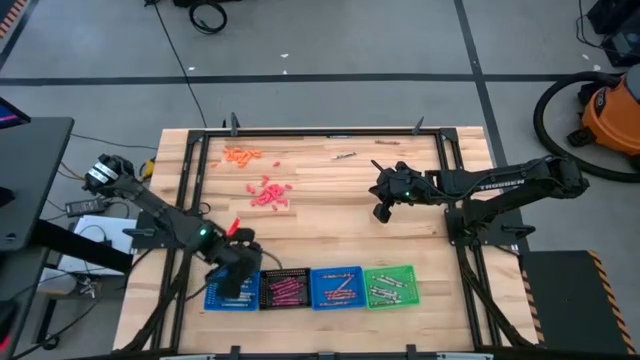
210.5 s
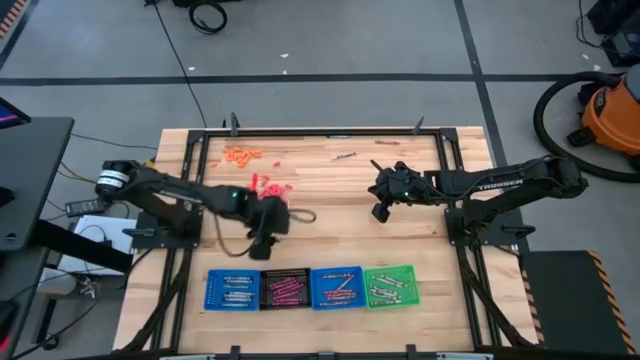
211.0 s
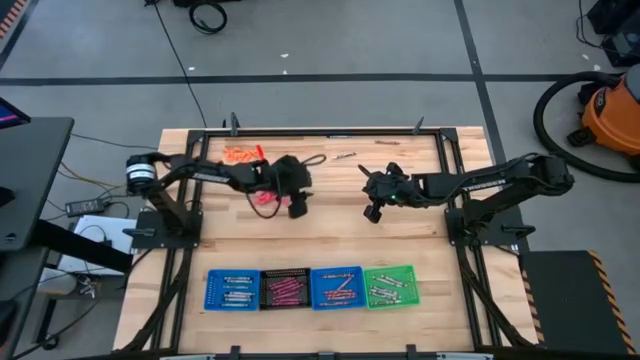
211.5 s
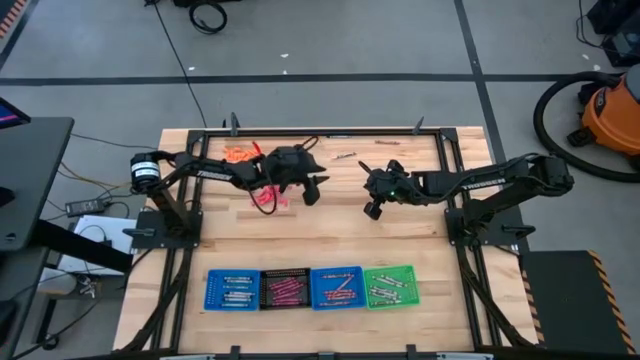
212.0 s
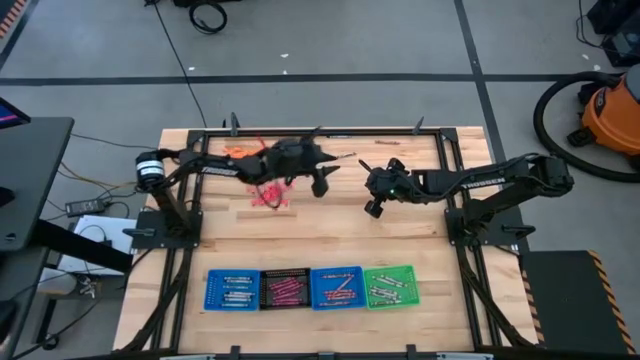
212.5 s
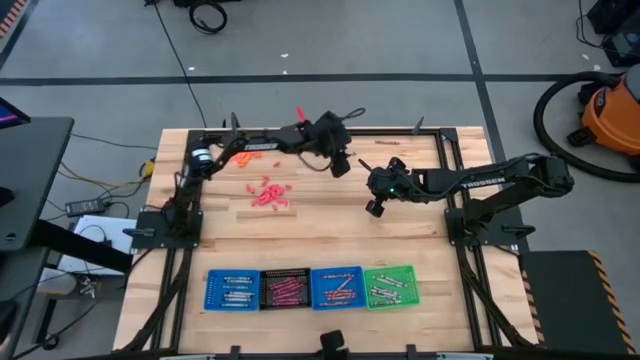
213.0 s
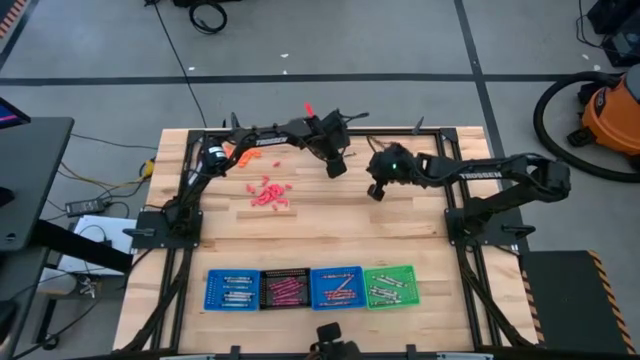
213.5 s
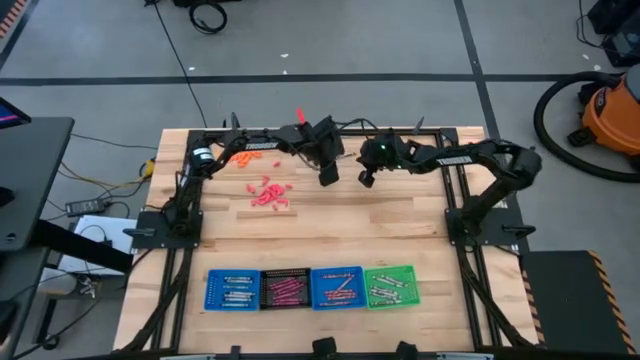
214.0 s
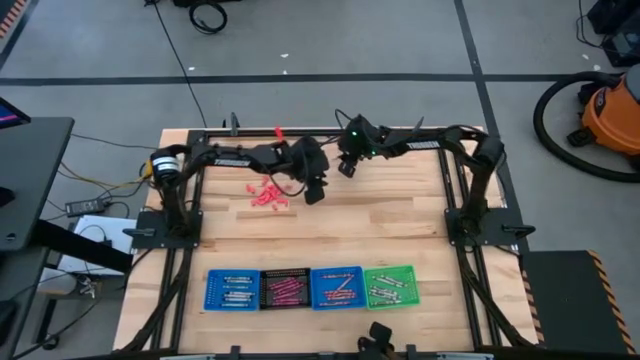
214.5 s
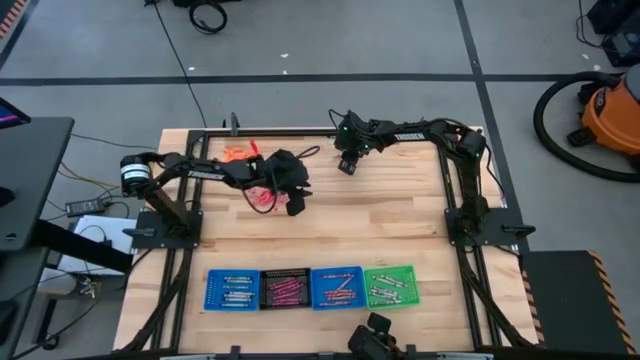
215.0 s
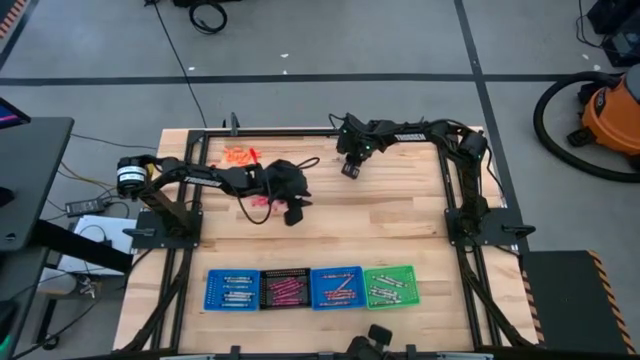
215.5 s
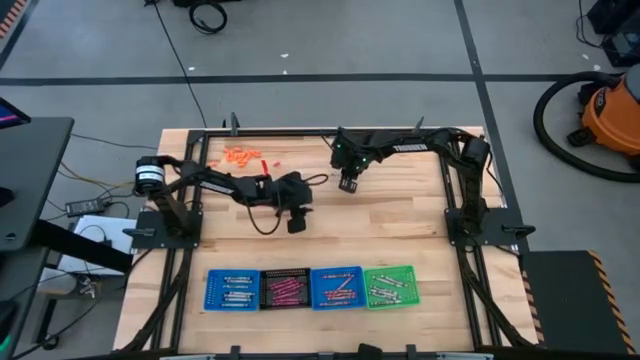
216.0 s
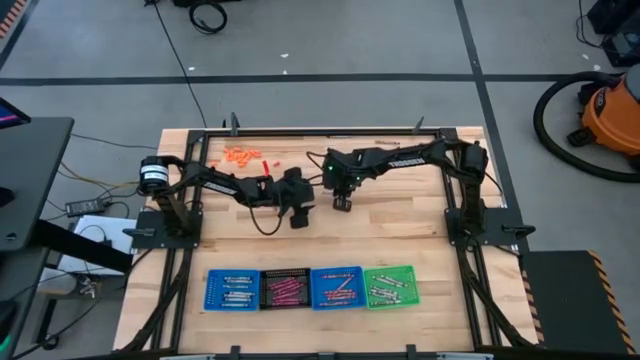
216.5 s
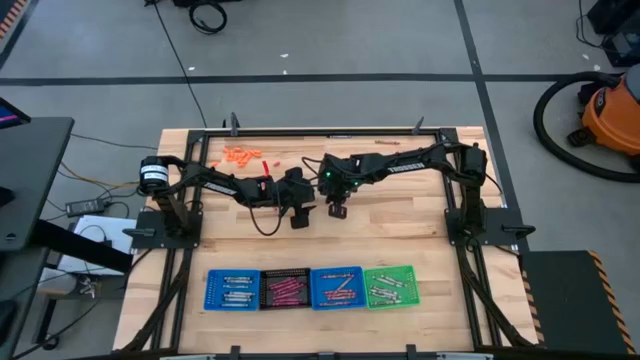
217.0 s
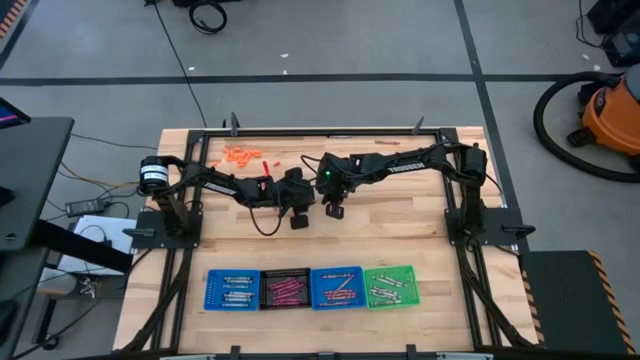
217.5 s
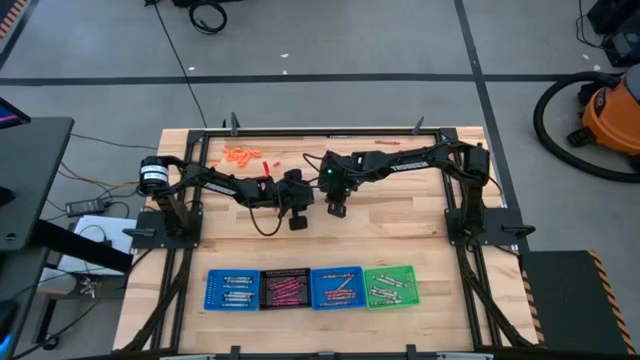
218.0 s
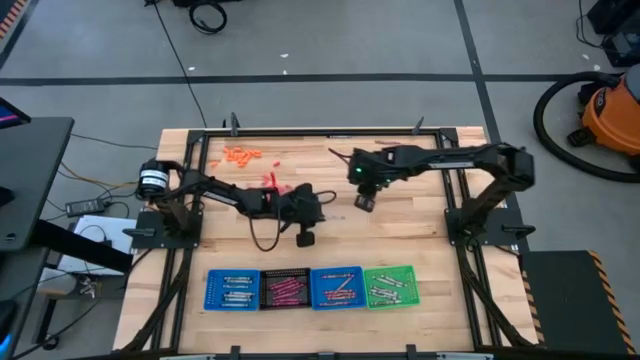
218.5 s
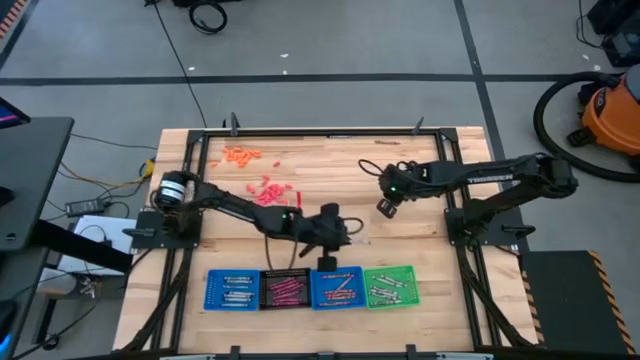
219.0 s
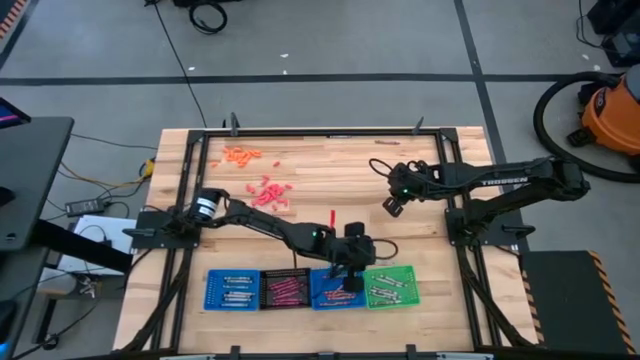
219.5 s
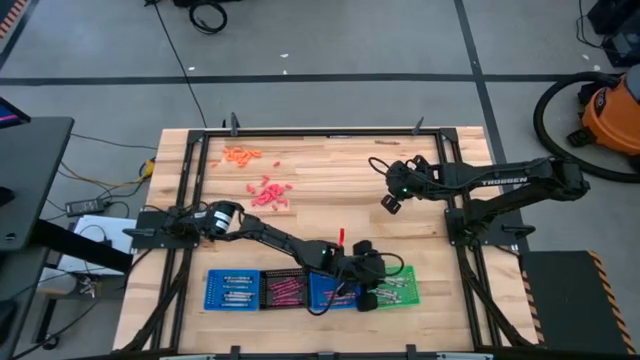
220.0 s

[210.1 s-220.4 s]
Task: Sort crayons
Put the white crayon into the green bin

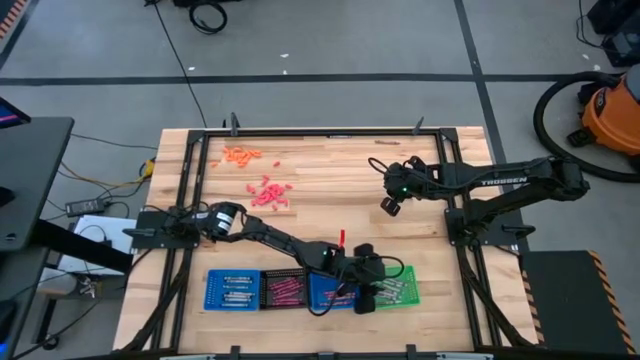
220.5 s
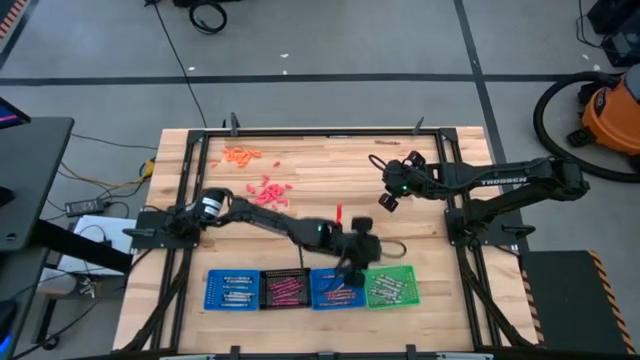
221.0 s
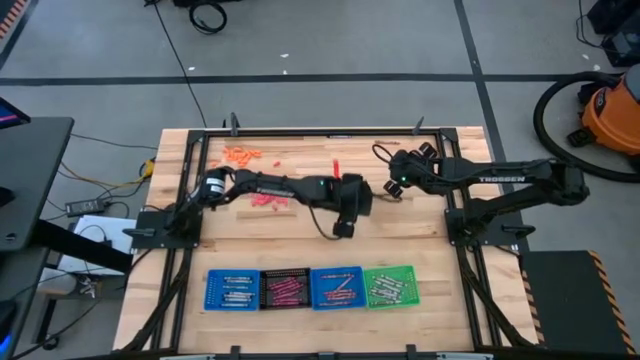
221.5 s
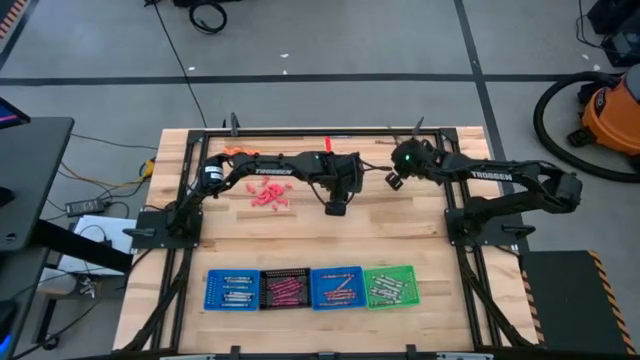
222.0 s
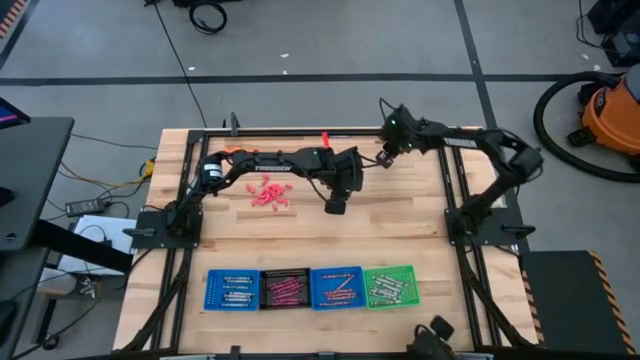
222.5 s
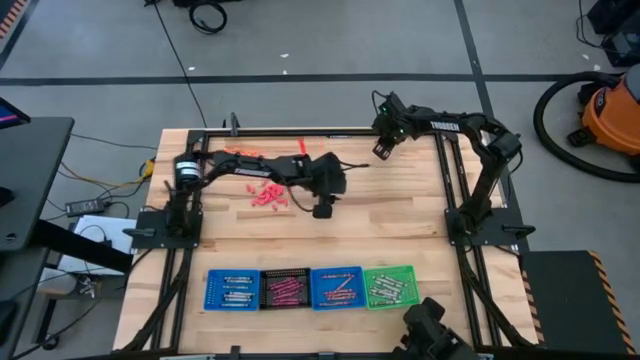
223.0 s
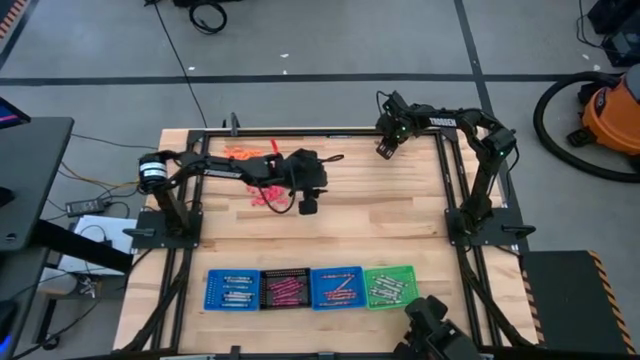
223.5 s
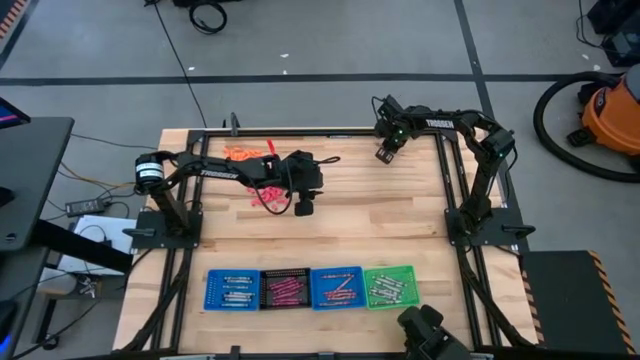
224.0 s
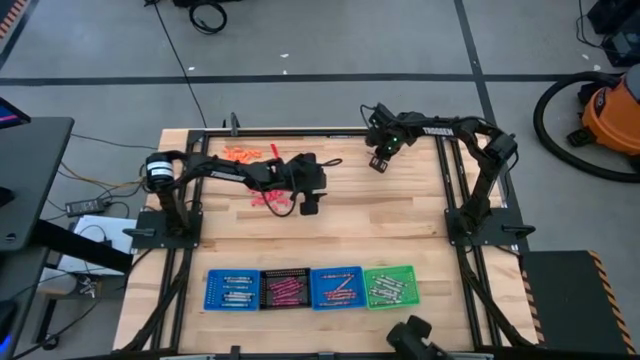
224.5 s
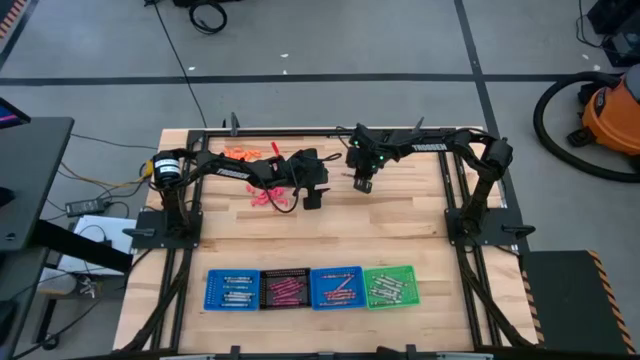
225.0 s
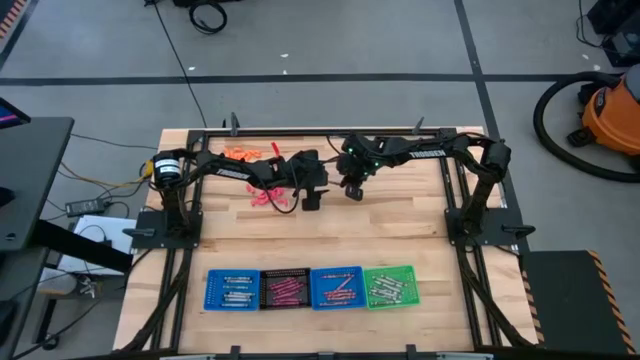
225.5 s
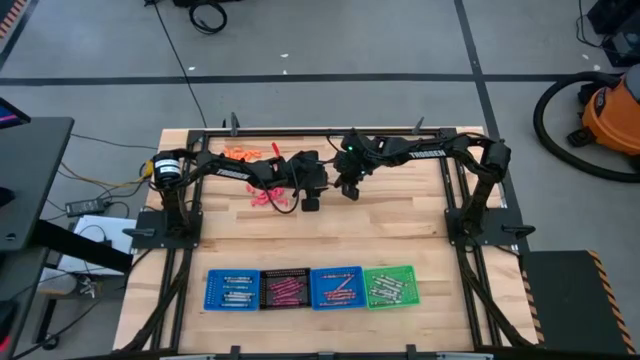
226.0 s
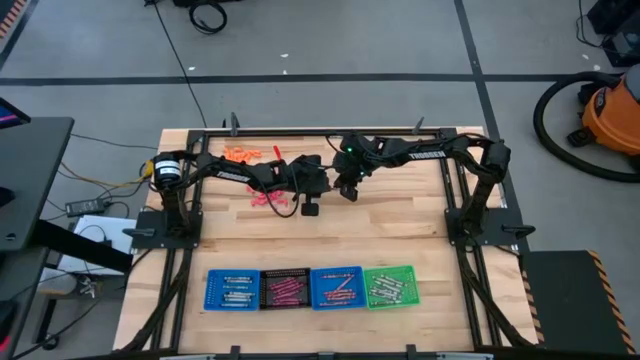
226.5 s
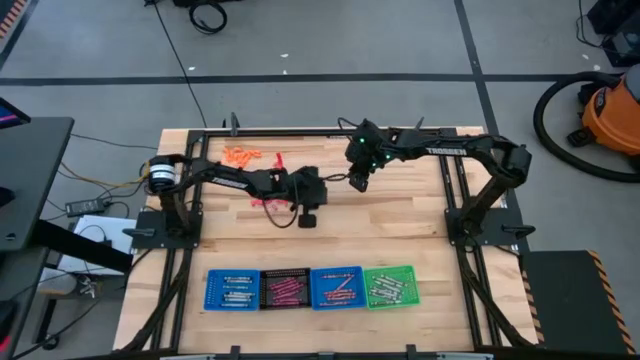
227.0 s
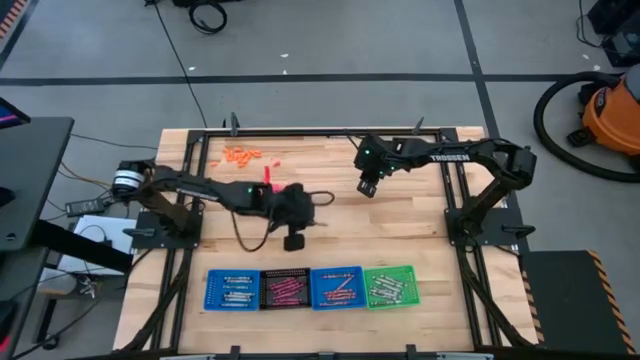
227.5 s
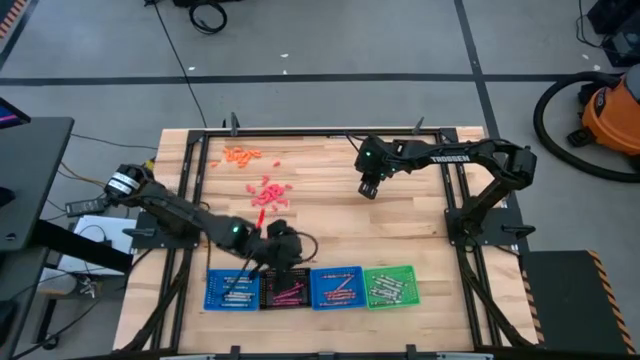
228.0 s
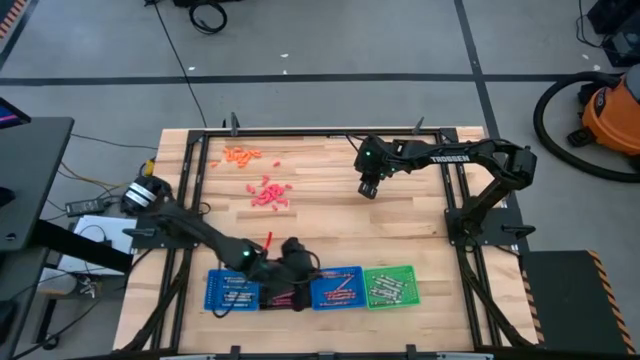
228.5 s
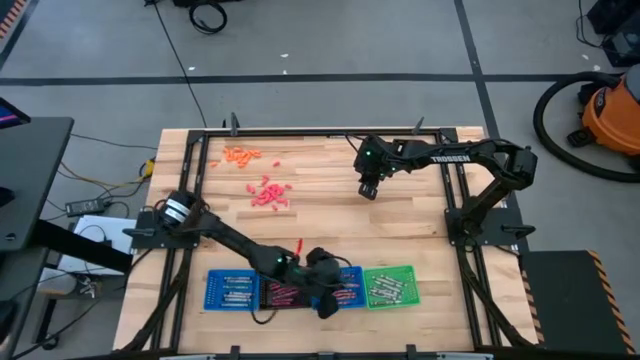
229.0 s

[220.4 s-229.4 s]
Put the pink crayon into the right blue bin

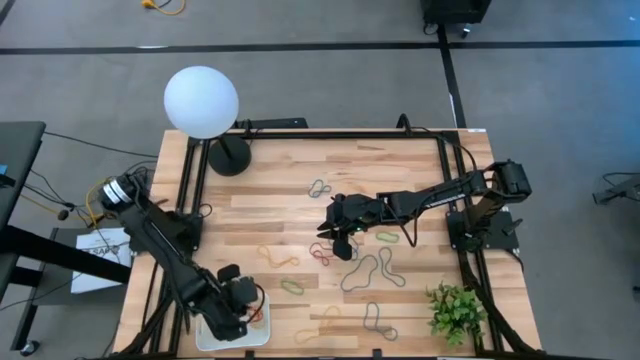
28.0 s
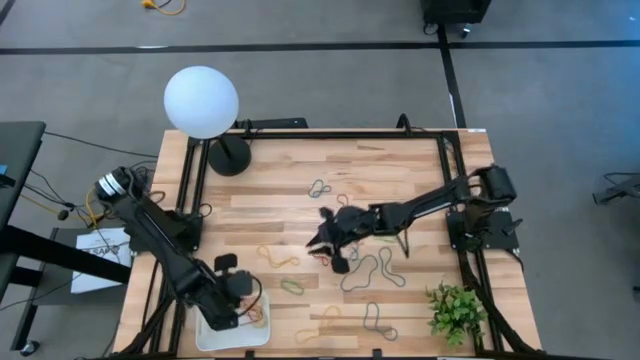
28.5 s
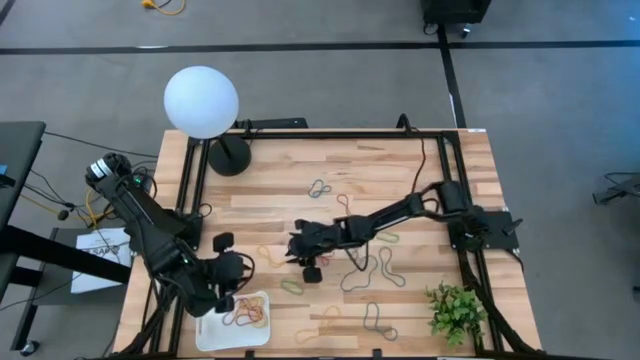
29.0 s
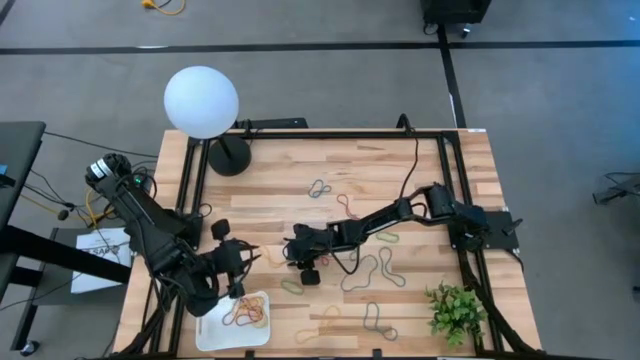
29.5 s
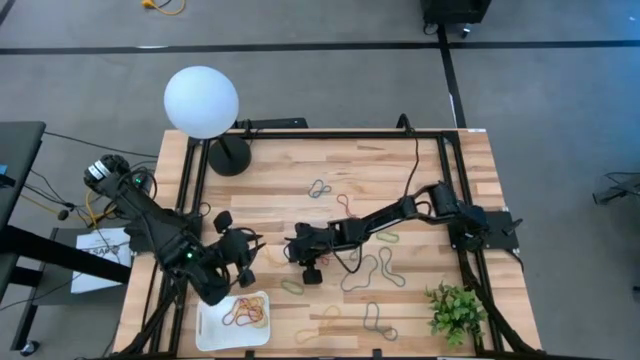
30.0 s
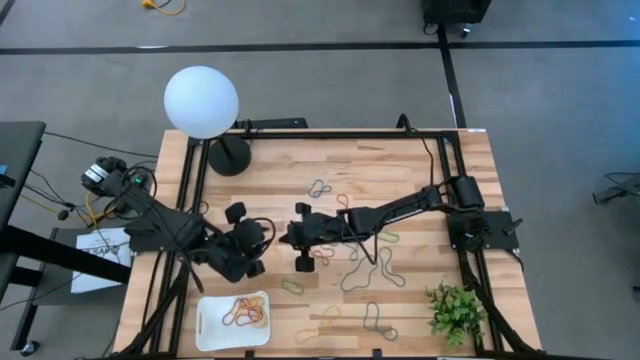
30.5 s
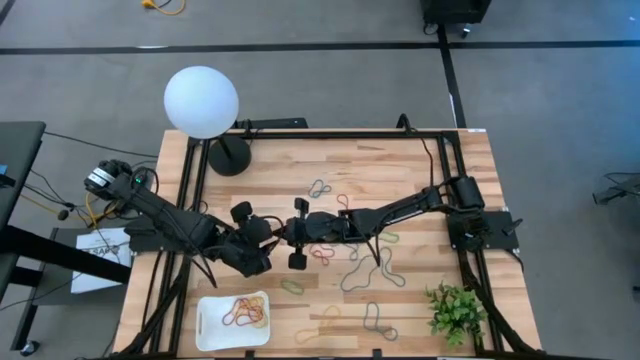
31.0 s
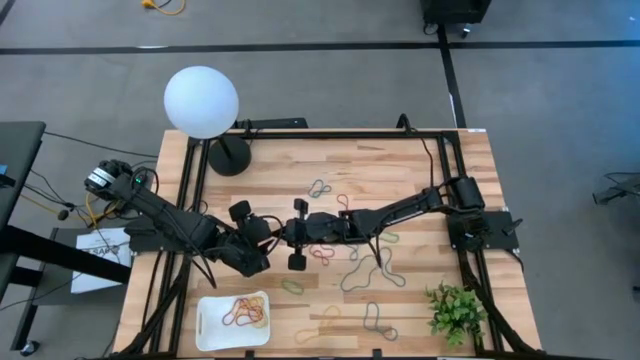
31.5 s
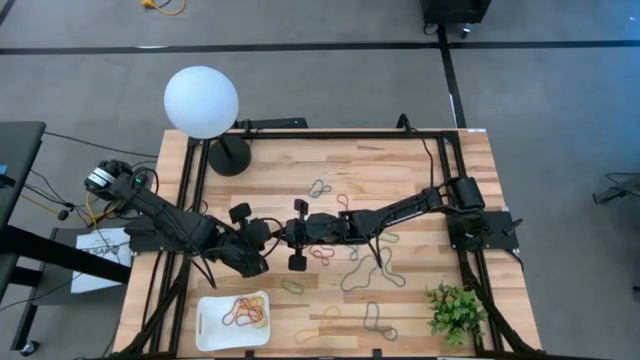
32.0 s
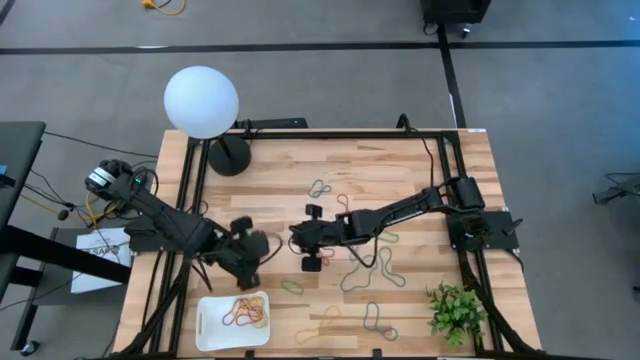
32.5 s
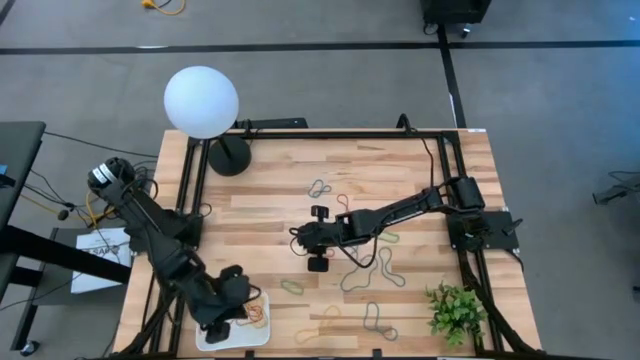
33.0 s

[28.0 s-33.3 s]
Task: Pick and place items into bin
Put the yellow rubber band into the bin
